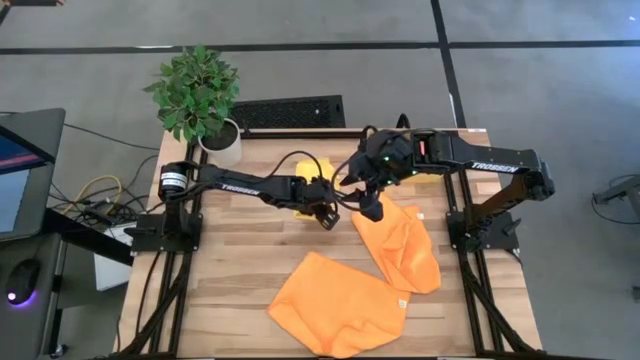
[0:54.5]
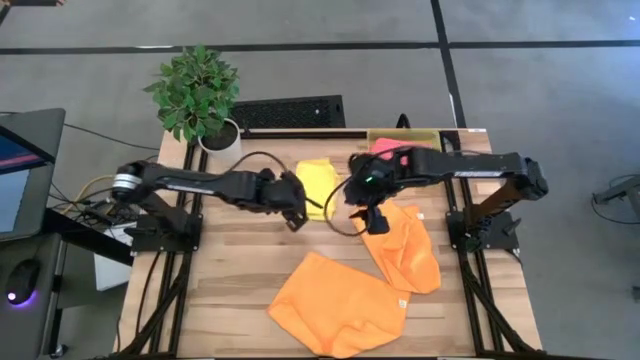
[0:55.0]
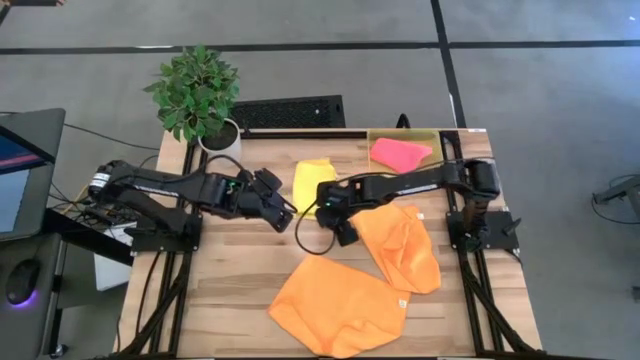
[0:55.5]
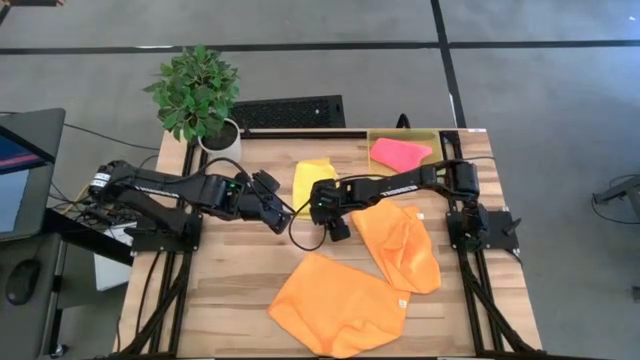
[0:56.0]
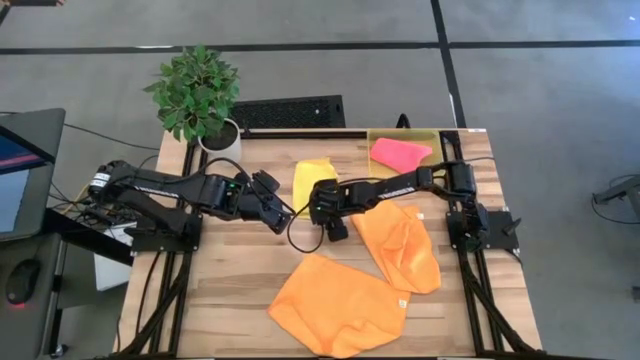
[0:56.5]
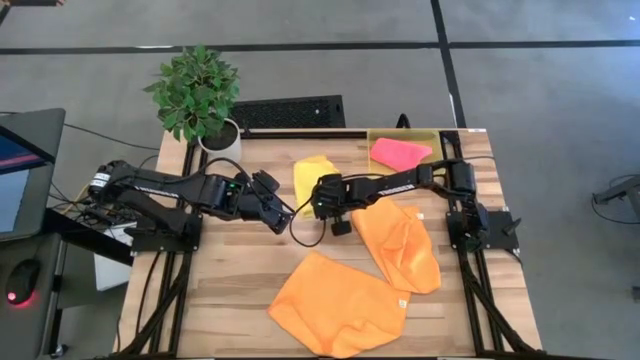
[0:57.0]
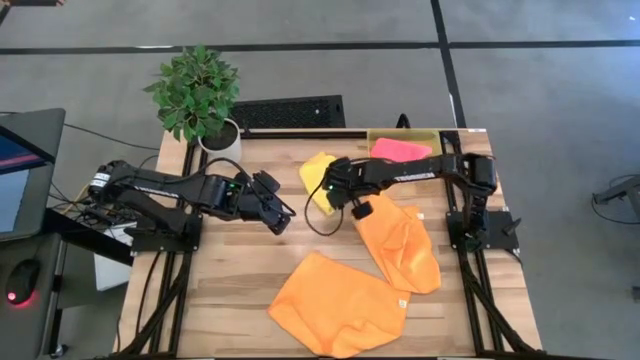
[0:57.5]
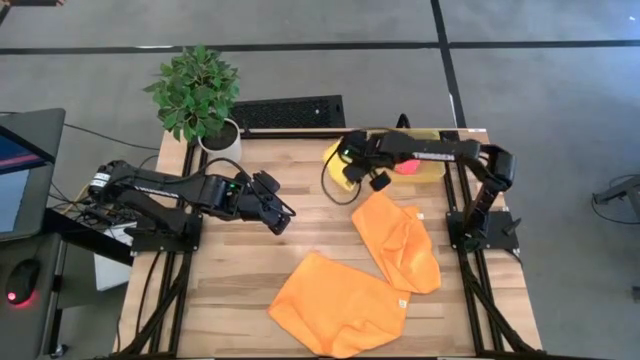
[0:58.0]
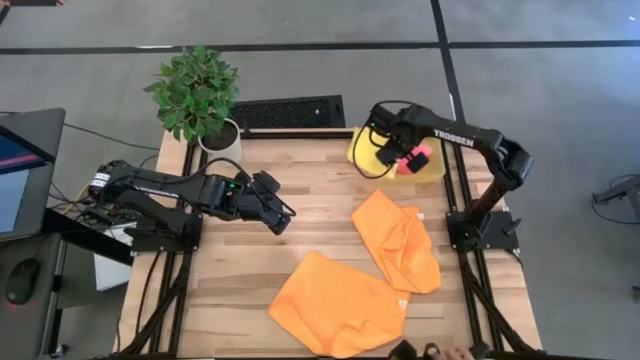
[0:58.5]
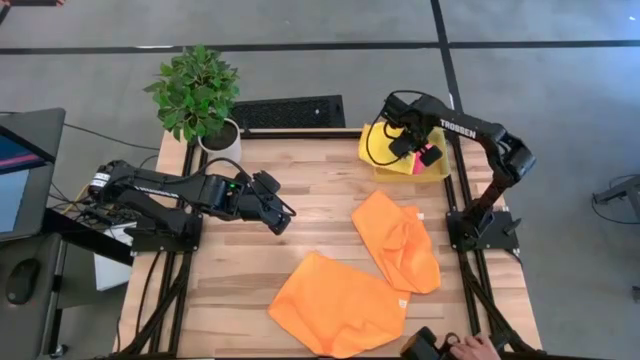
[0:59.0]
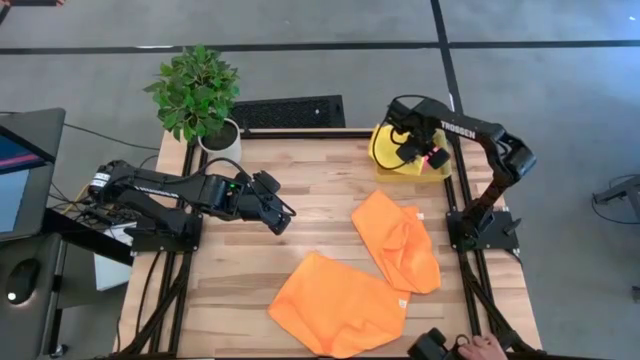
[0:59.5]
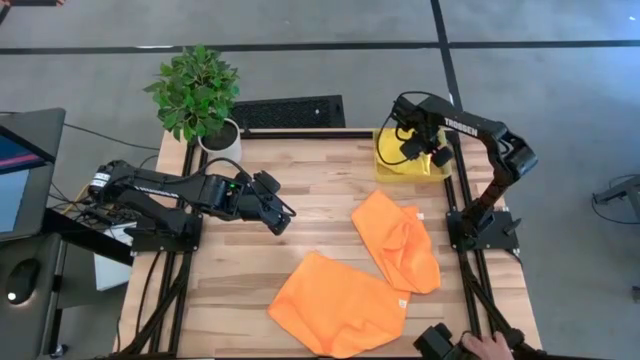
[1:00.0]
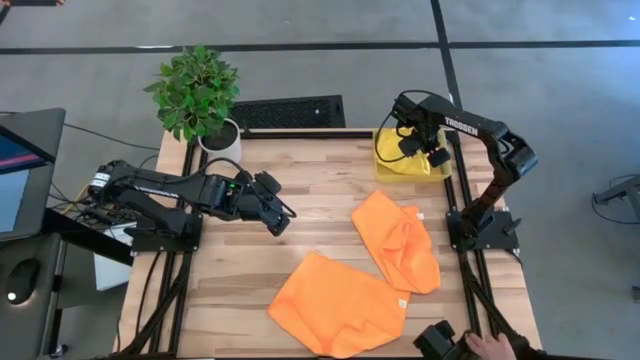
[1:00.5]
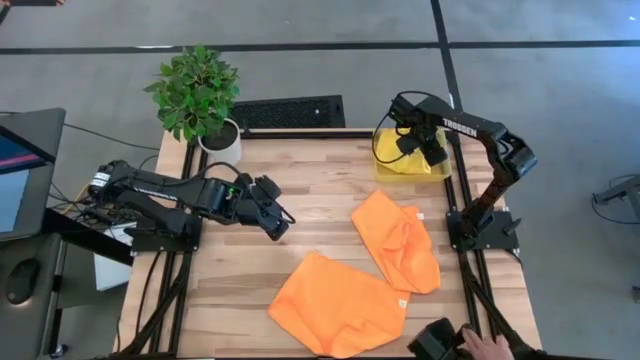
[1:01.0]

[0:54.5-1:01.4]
Task: Fold microfiber towels
Put the folded yellow microfiber towel into the yellow bin

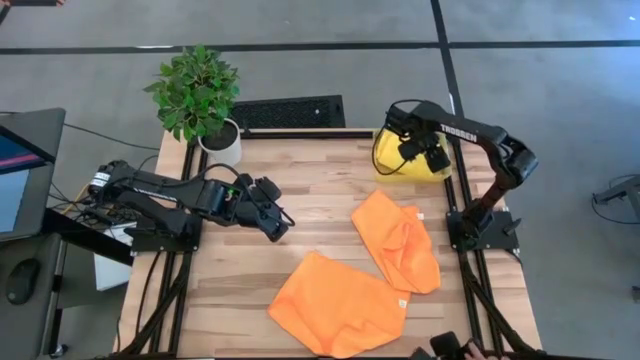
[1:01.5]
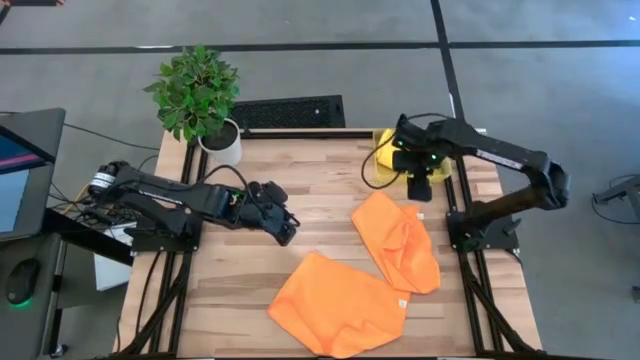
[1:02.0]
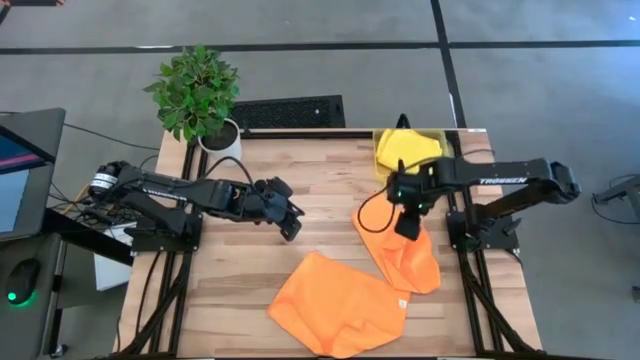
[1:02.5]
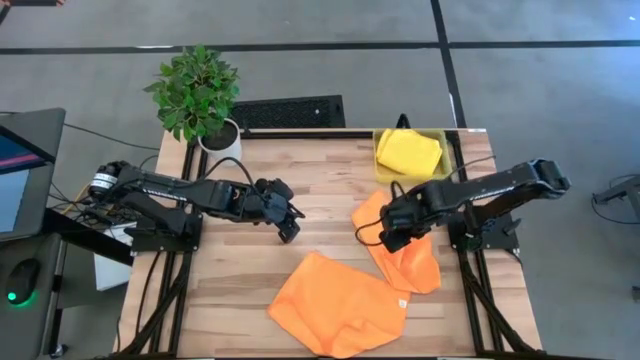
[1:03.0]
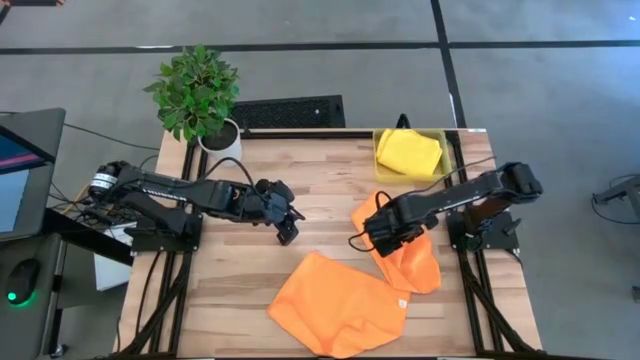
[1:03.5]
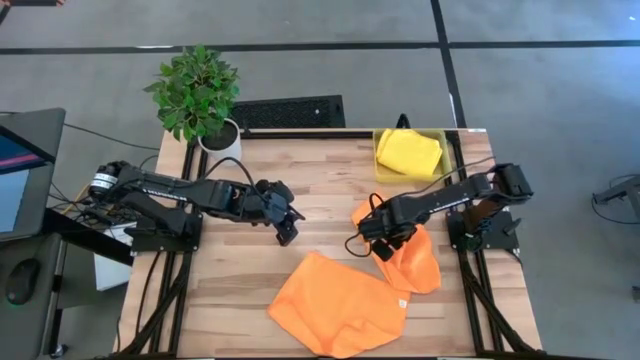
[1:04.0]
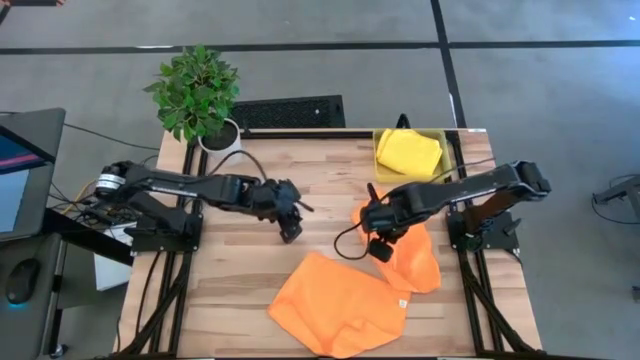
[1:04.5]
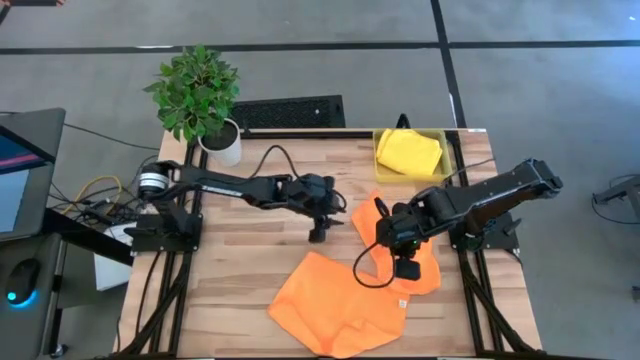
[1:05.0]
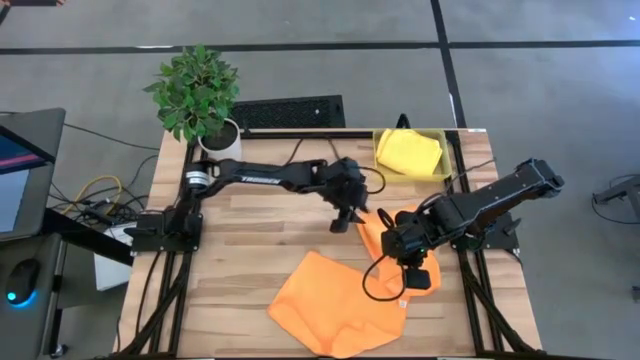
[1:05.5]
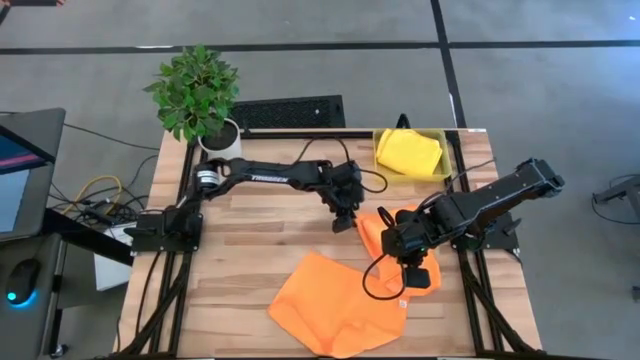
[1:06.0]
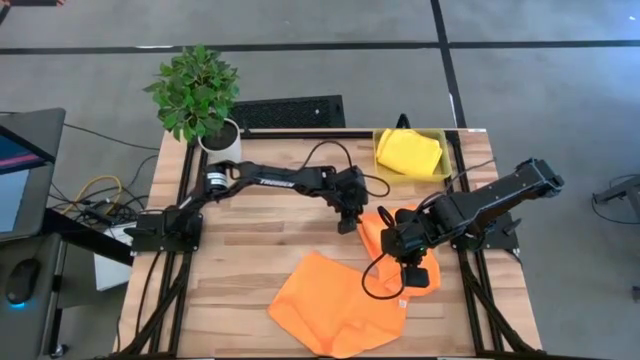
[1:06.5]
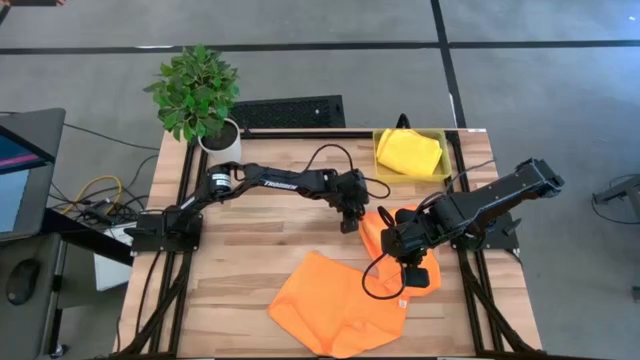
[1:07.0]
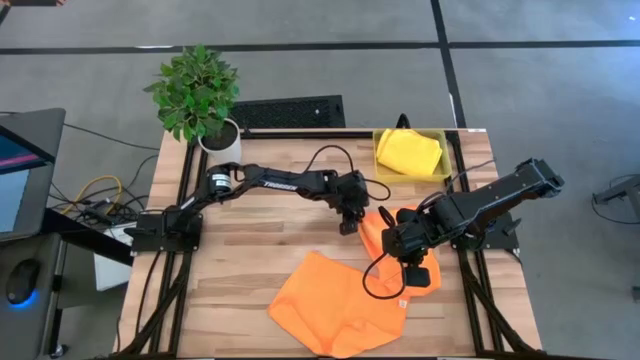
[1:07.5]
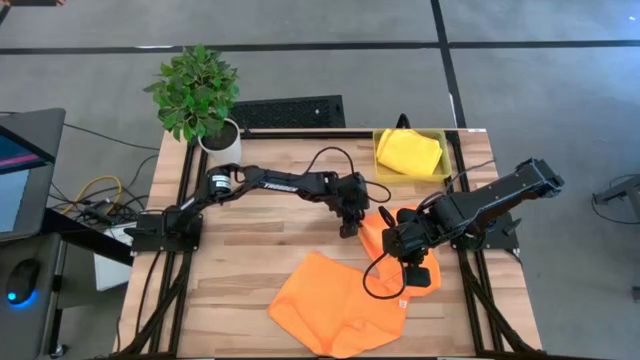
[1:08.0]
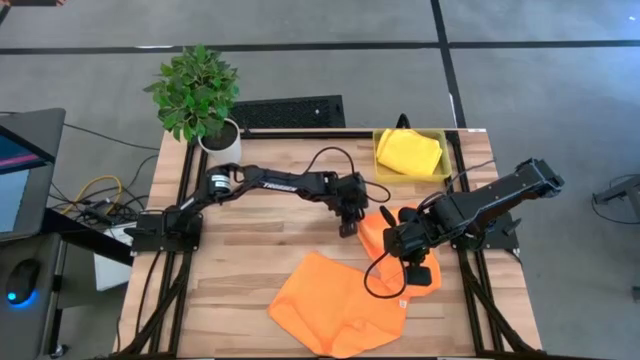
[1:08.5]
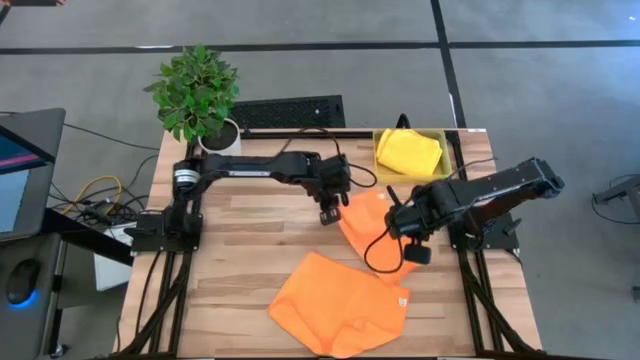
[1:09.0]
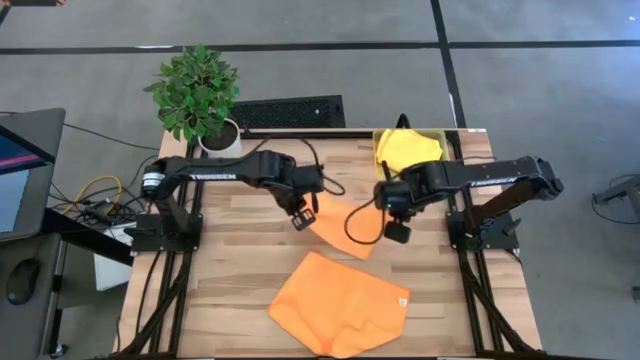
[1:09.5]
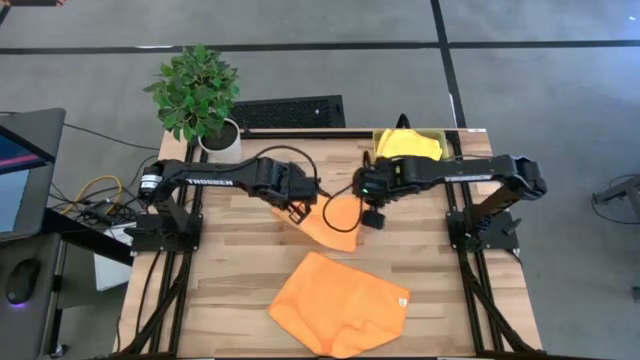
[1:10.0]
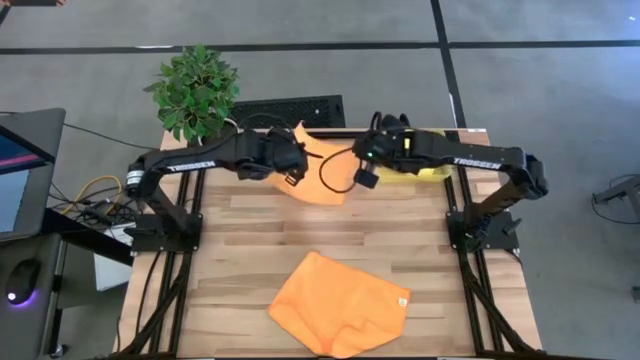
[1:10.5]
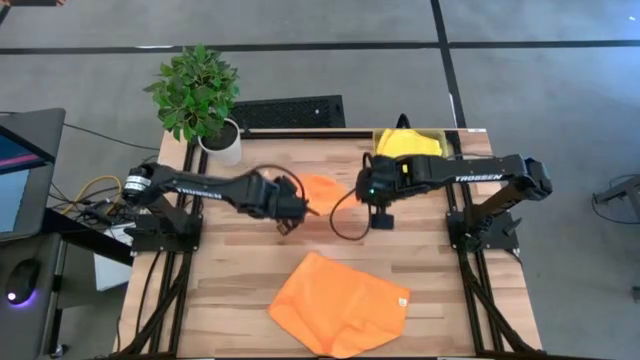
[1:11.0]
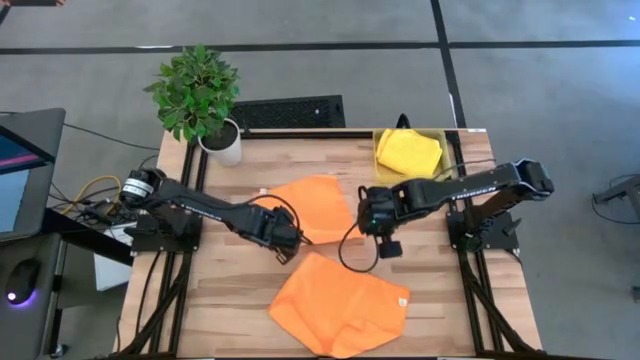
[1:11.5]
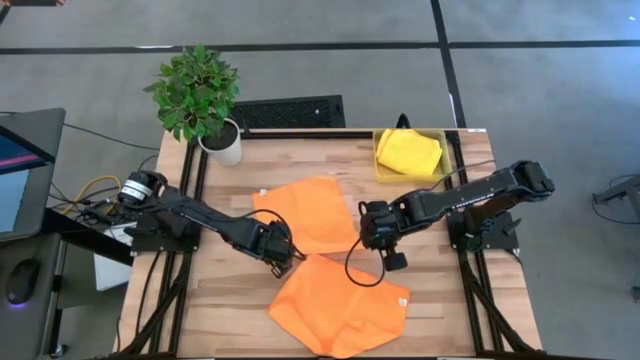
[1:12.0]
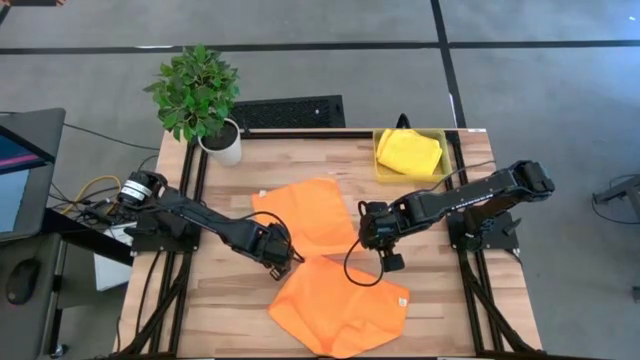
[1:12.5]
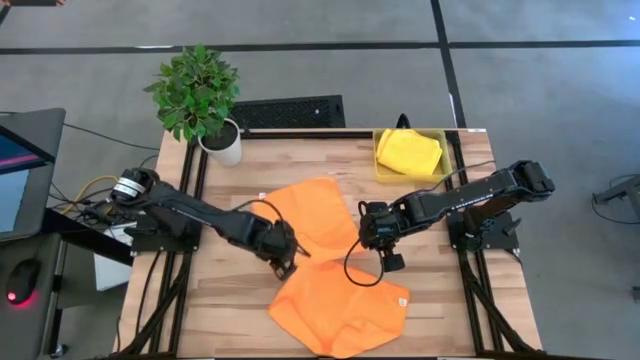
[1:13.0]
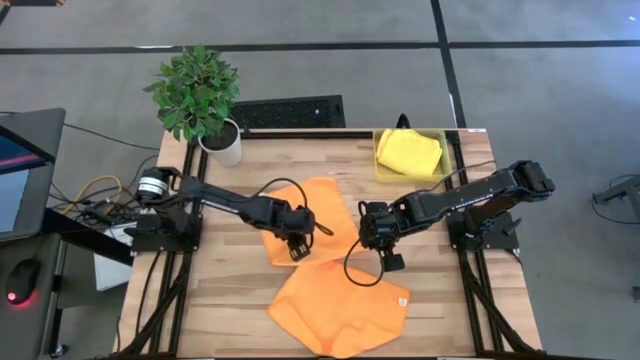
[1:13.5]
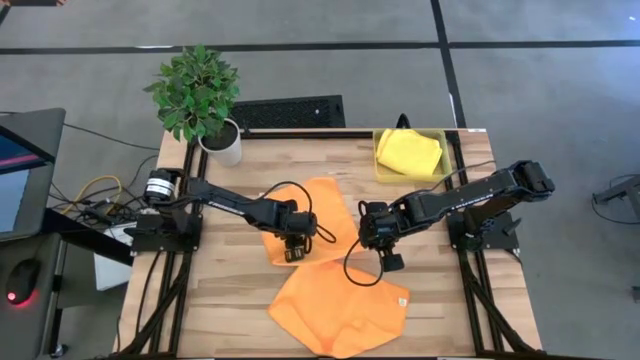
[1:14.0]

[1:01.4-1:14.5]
Fold the top orange microfiber towel
